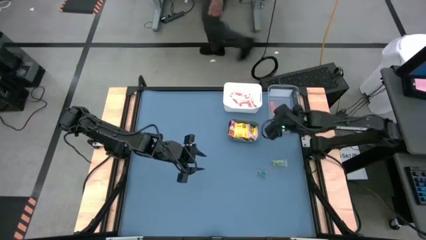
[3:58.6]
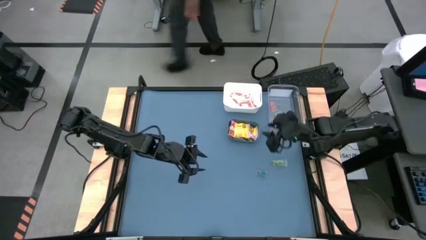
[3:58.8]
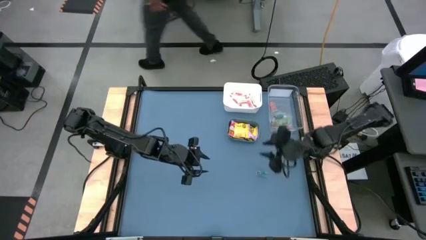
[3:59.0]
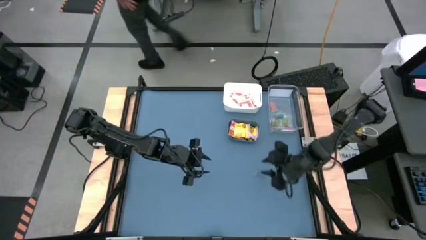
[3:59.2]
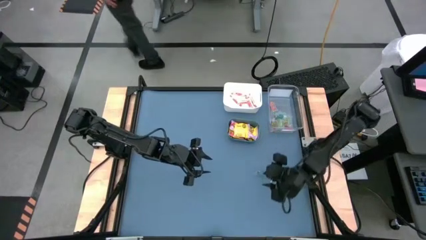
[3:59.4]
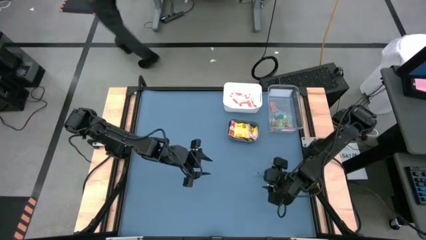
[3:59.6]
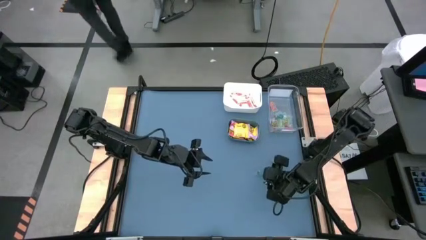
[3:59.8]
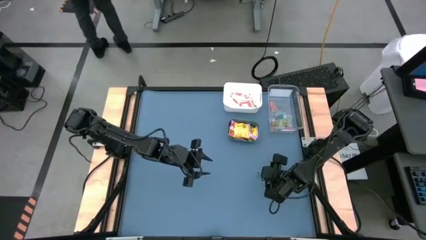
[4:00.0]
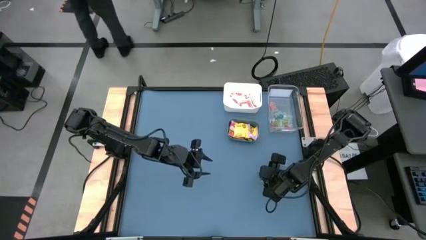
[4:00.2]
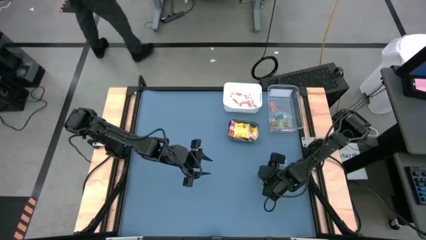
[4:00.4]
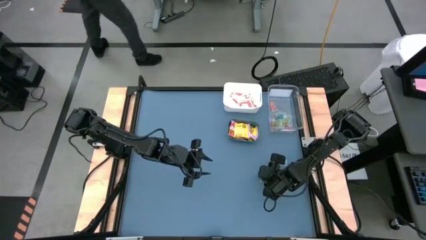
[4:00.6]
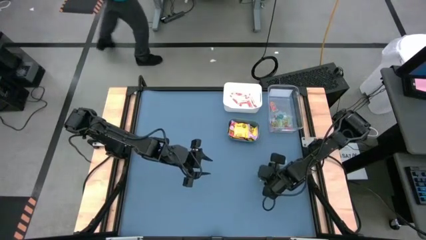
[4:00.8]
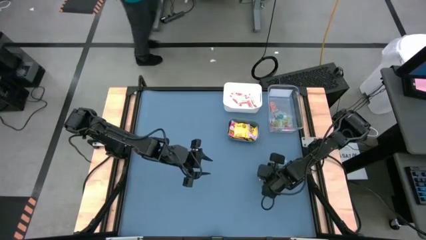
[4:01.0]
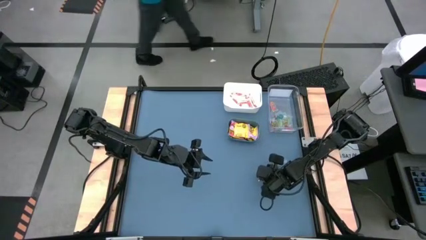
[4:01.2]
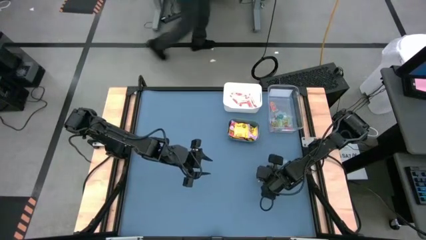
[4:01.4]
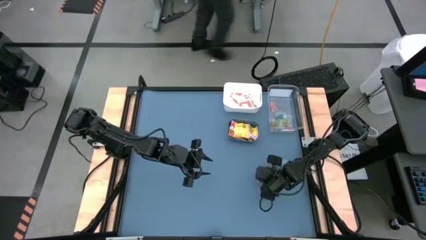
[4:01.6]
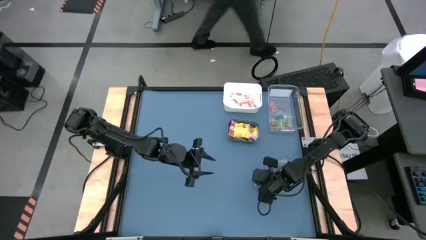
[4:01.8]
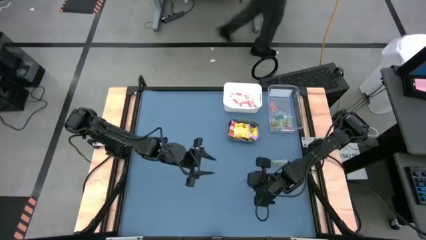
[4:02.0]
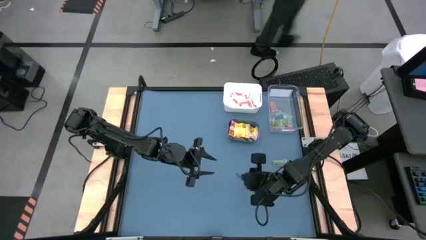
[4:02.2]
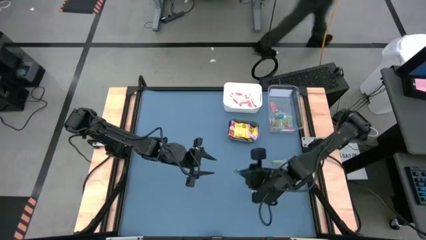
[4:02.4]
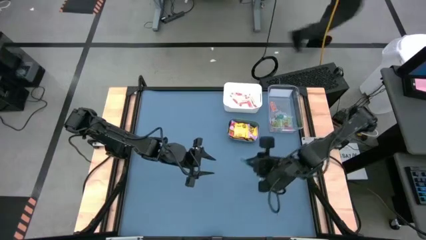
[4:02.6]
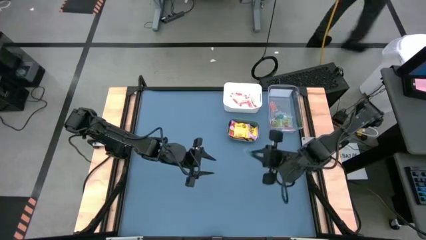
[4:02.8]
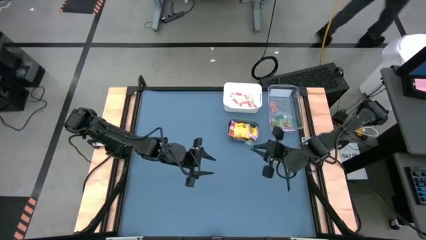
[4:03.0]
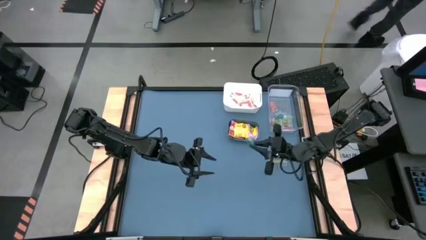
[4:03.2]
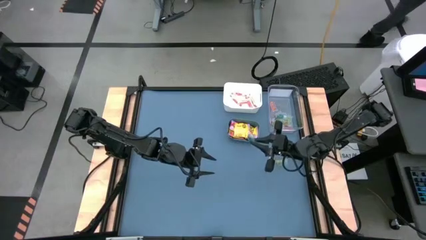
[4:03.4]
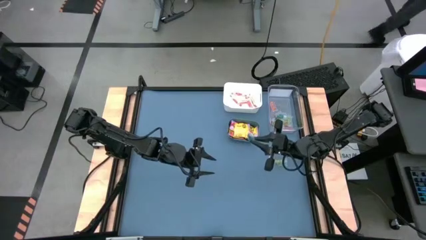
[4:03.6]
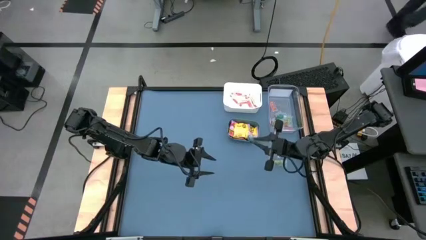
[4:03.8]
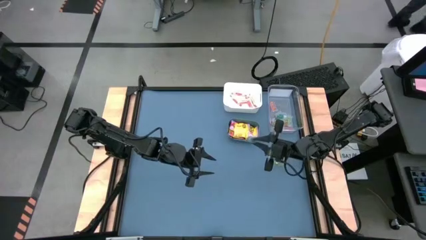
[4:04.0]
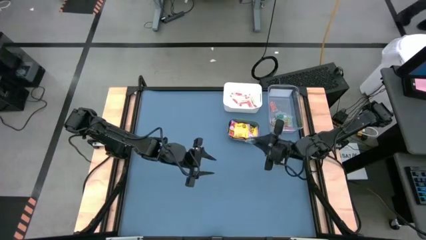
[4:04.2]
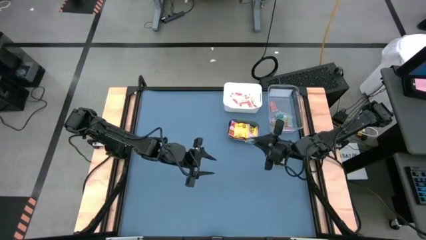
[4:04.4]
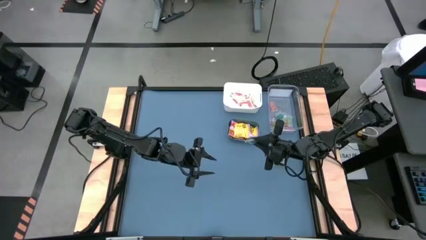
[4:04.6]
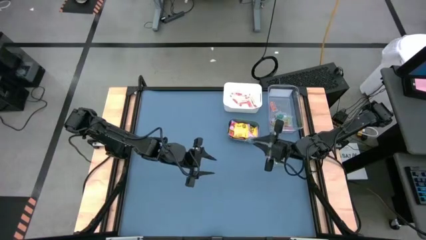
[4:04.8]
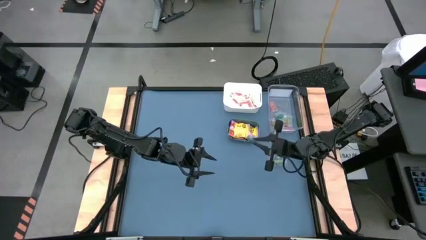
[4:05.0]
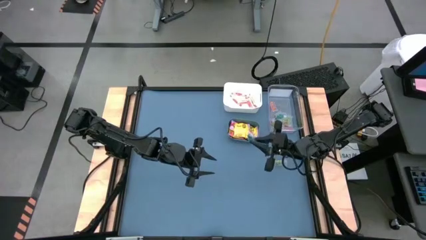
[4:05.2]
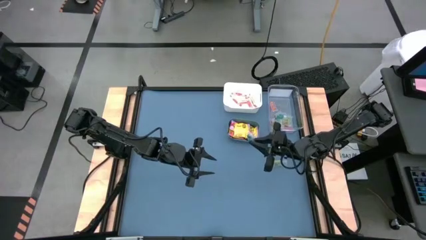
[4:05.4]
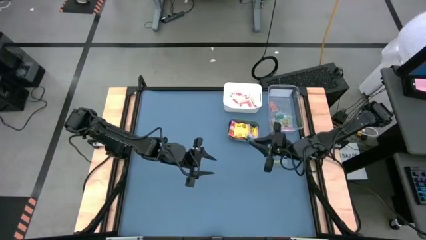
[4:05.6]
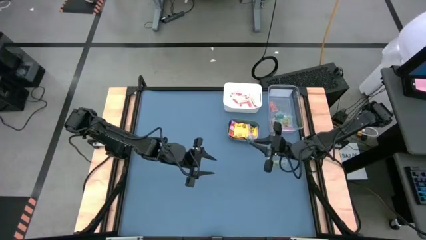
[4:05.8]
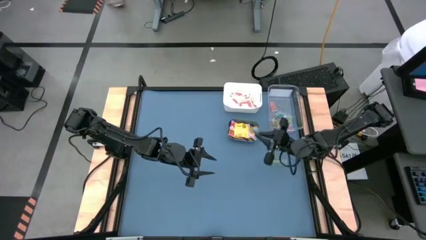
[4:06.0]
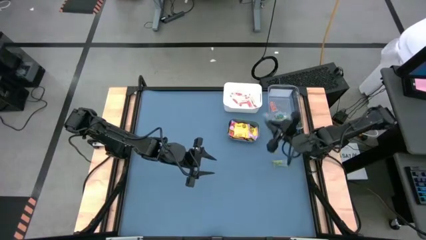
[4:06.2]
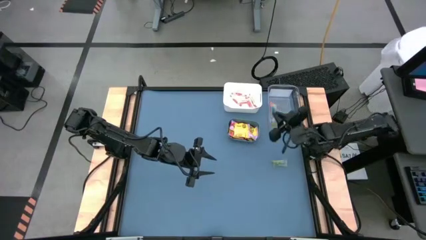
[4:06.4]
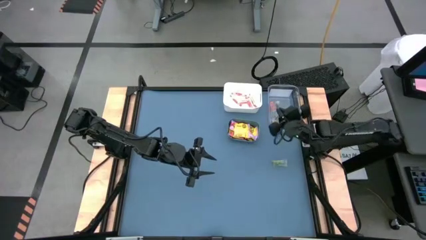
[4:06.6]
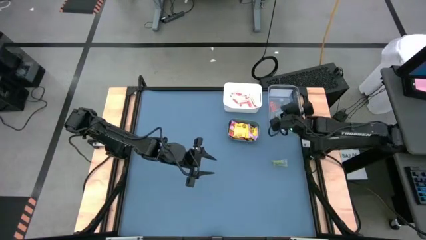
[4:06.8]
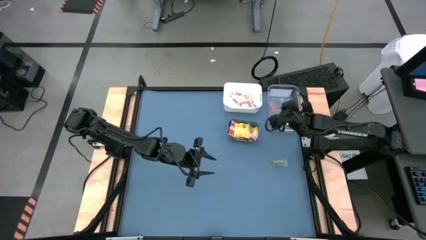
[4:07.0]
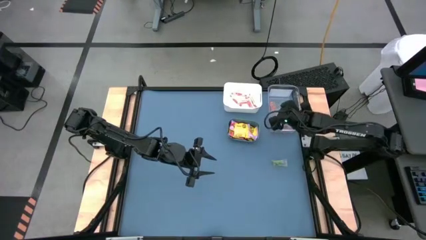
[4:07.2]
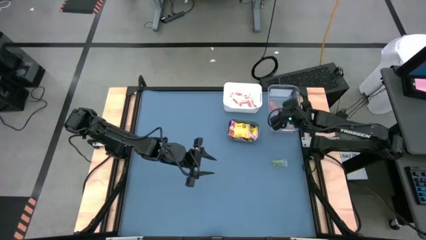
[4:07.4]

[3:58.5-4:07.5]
Task: Sort candy
Put the left blue candy into the transparent bin

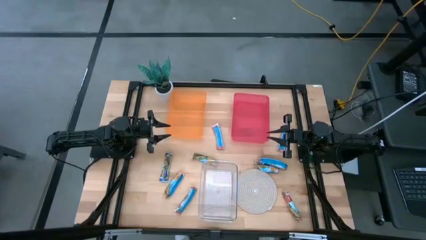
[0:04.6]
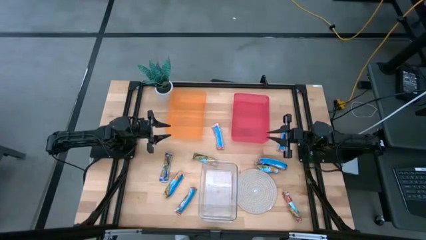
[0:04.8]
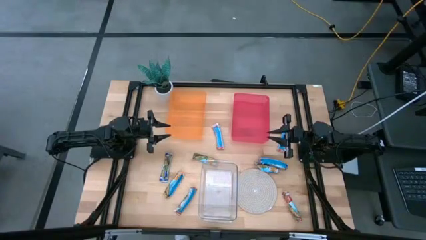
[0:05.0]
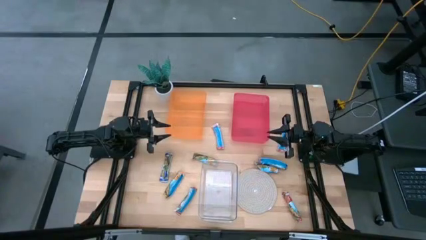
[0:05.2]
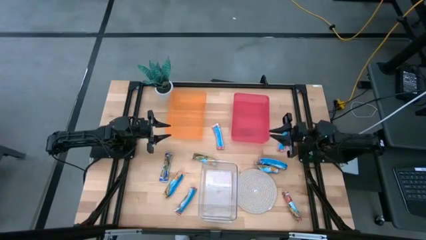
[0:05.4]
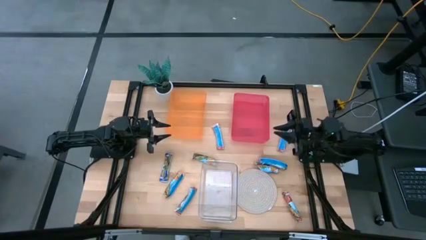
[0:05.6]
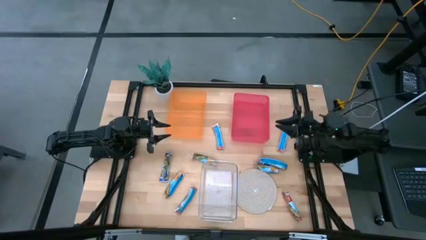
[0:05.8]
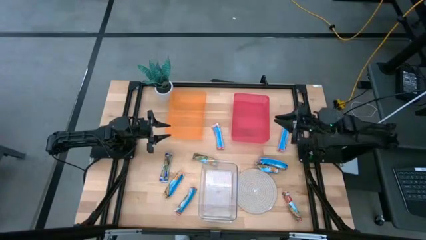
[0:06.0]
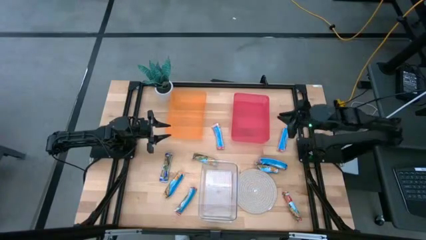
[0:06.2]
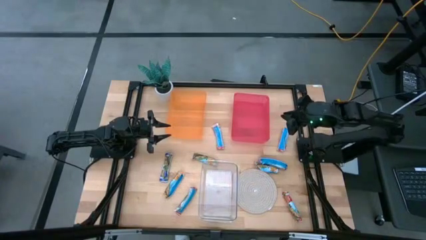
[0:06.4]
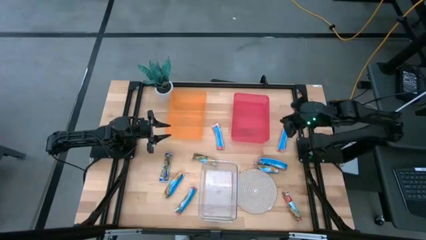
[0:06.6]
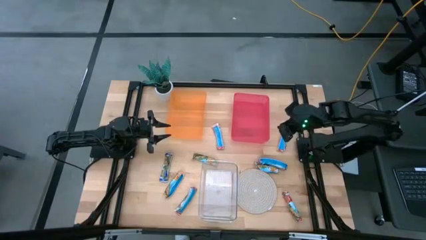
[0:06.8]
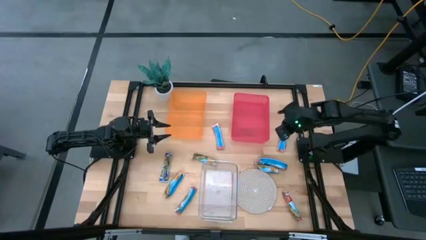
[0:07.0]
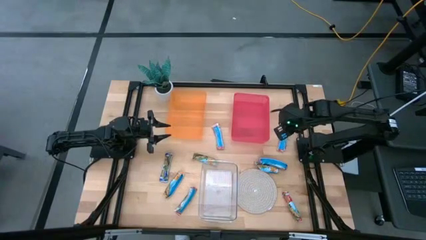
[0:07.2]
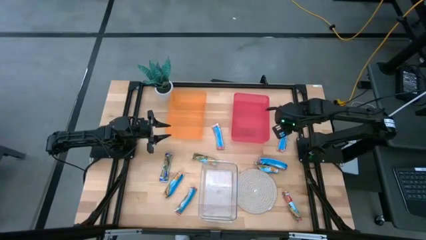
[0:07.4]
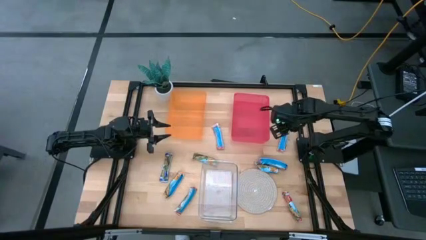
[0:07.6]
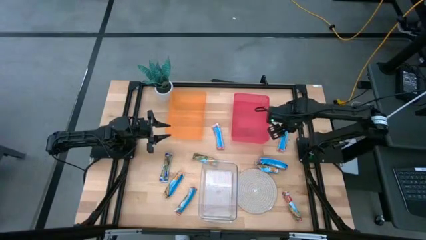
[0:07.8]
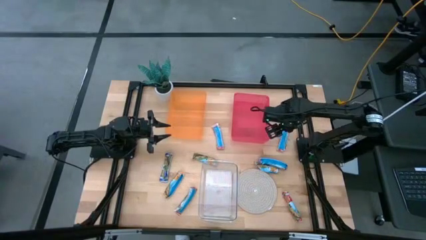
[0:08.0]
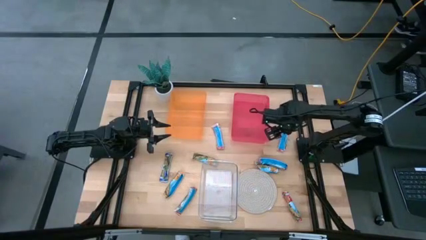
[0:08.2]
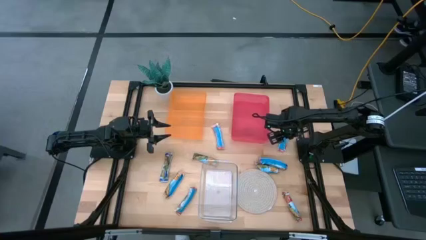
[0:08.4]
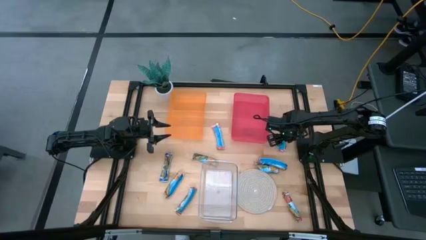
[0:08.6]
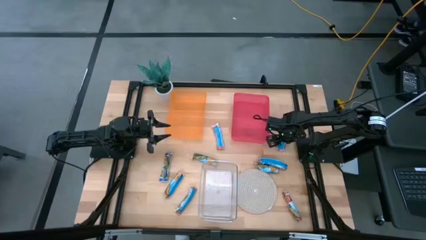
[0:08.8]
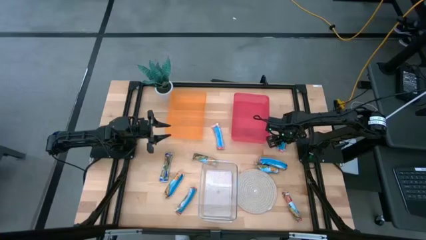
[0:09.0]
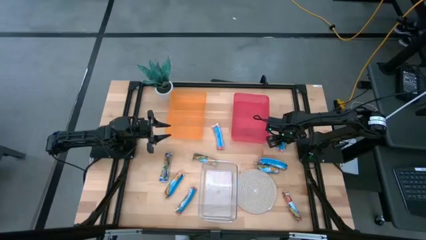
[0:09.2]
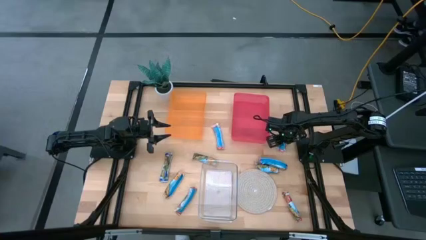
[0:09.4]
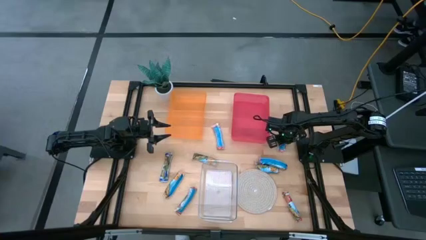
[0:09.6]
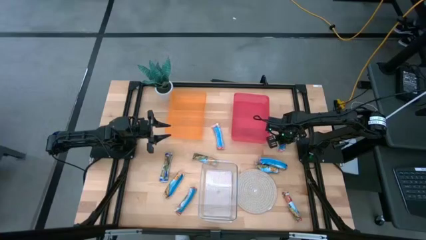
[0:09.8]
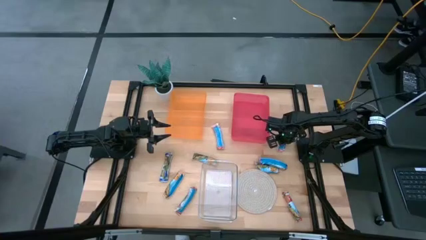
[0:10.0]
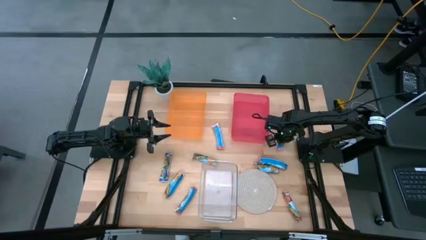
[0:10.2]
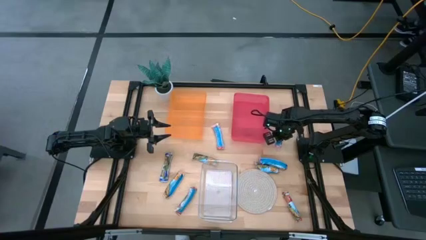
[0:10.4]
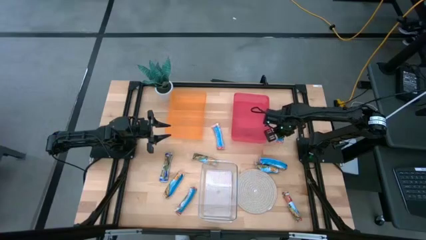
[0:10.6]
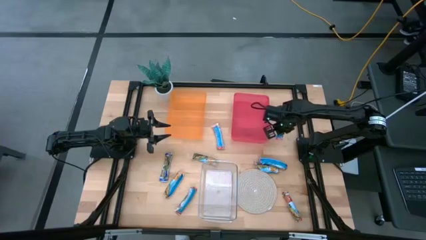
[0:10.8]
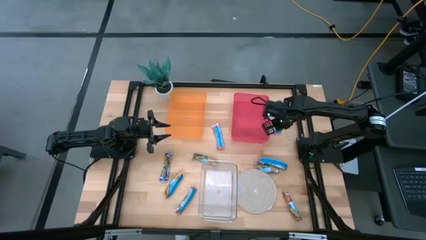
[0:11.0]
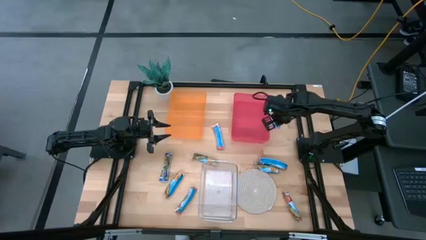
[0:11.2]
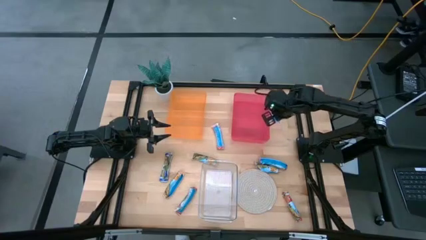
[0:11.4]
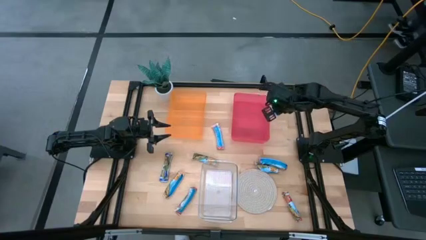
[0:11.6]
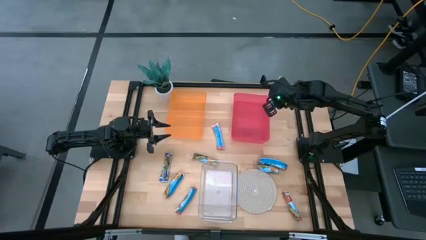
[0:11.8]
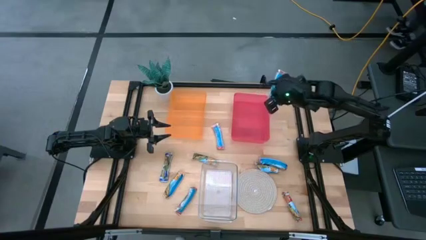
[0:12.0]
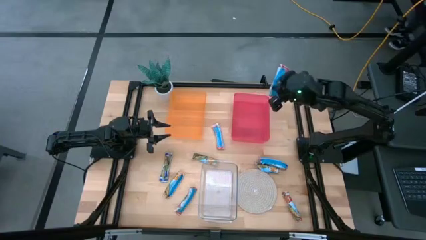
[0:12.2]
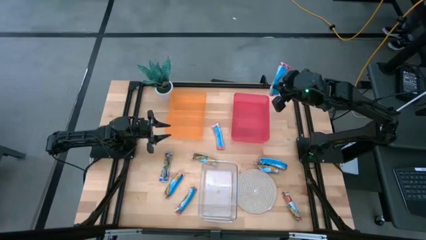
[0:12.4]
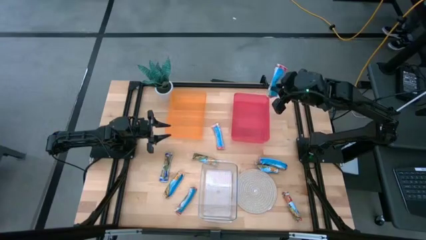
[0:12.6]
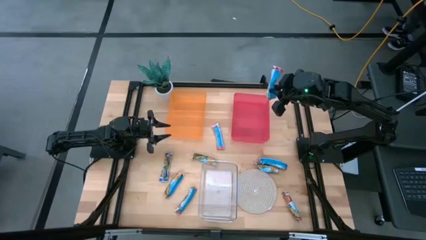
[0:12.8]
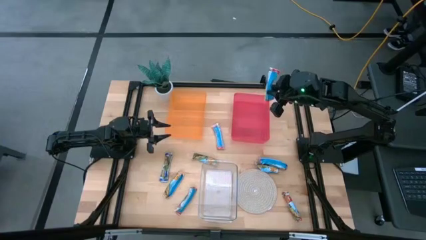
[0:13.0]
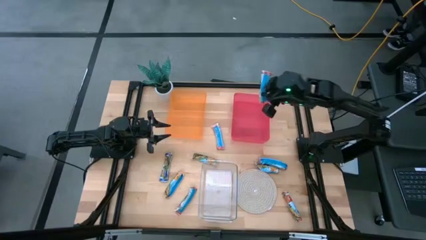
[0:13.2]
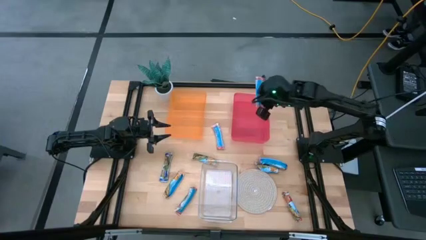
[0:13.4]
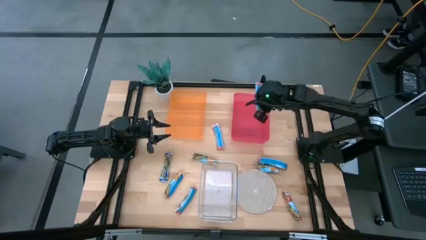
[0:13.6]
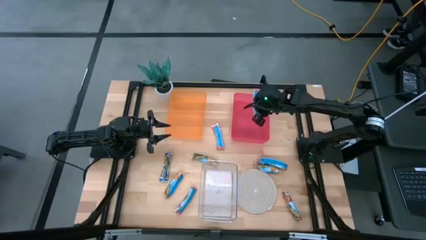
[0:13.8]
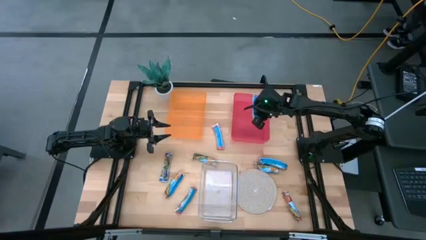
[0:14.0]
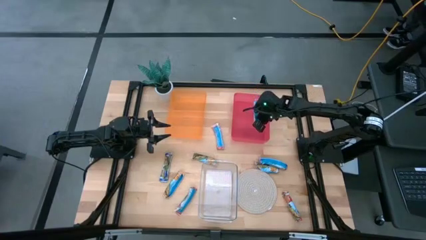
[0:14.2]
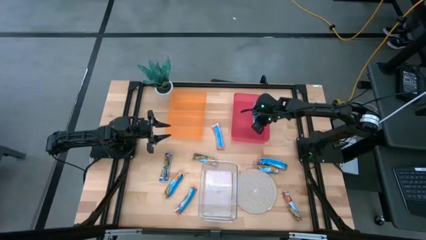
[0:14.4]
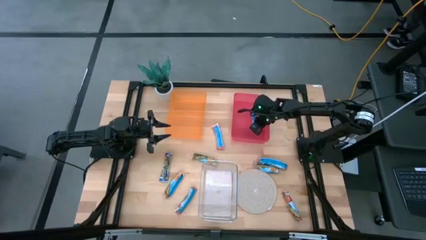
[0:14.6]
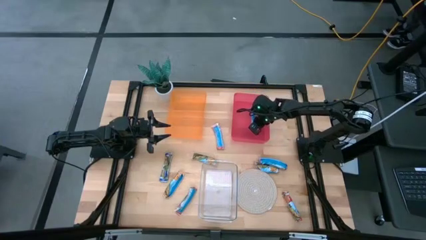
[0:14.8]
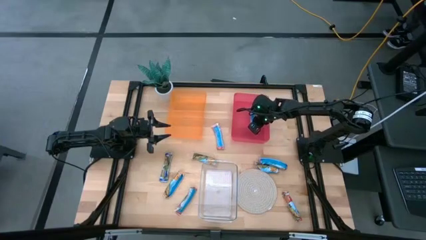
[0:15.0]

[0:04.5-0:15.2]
Task: Pick and place Granola Bars by type
Put the red granola bar into the red bin
